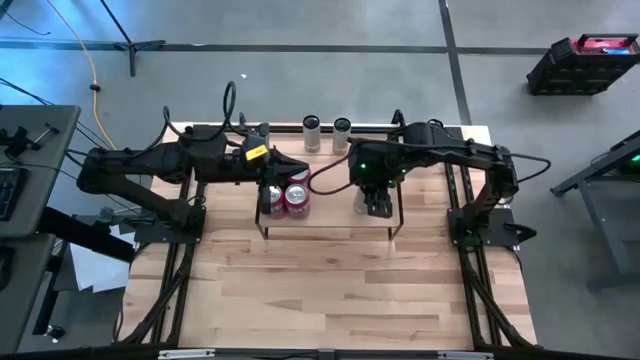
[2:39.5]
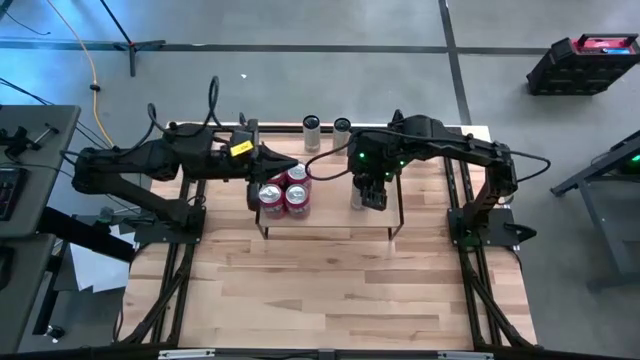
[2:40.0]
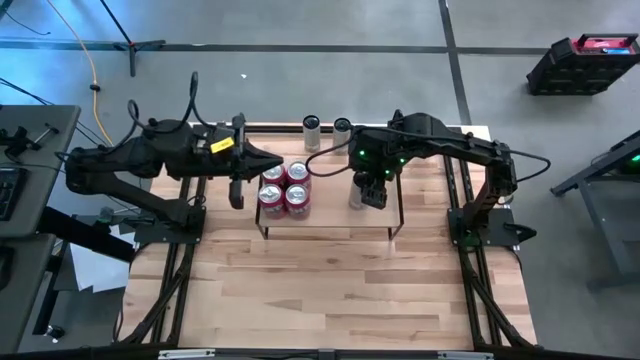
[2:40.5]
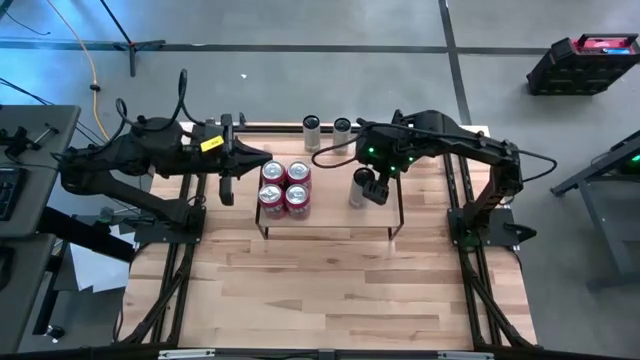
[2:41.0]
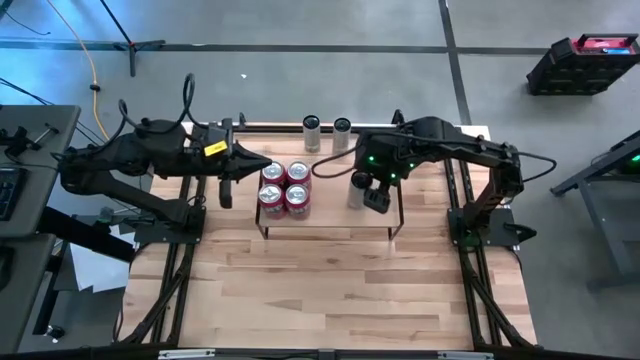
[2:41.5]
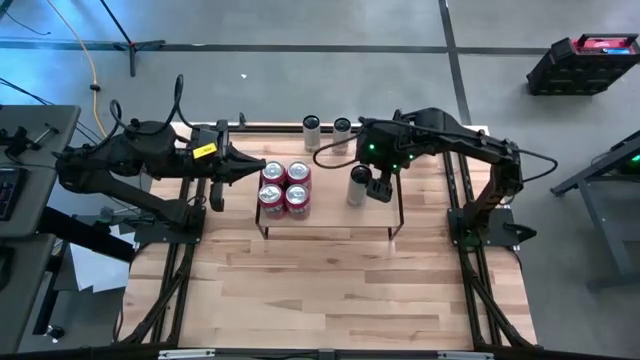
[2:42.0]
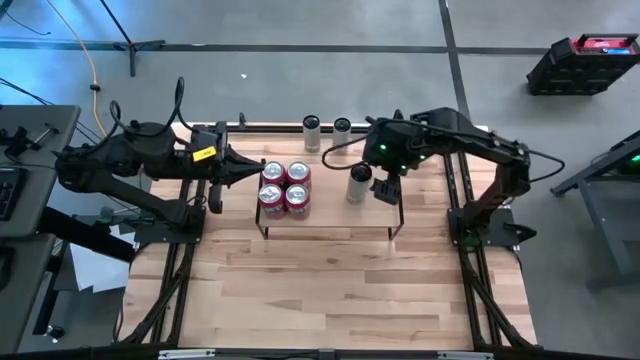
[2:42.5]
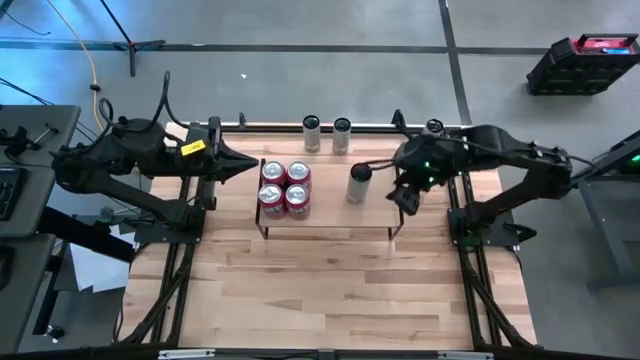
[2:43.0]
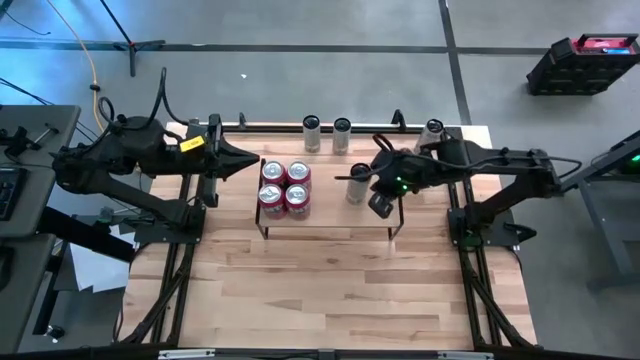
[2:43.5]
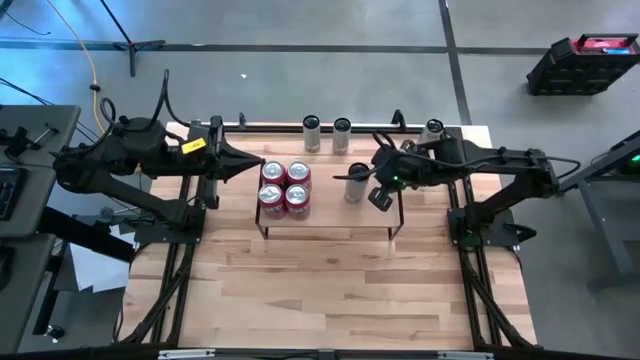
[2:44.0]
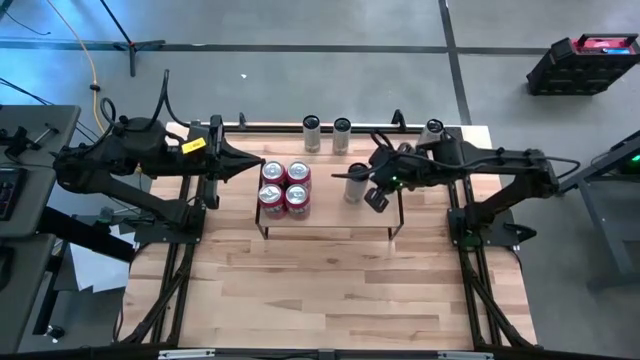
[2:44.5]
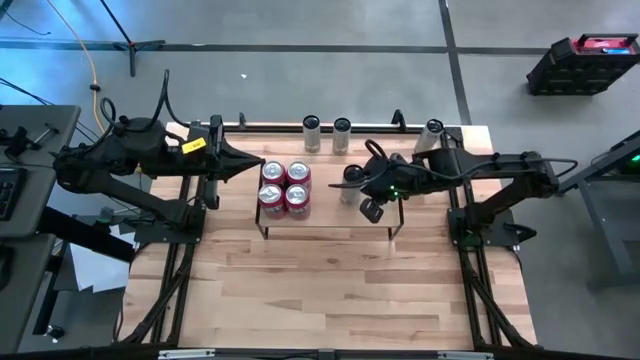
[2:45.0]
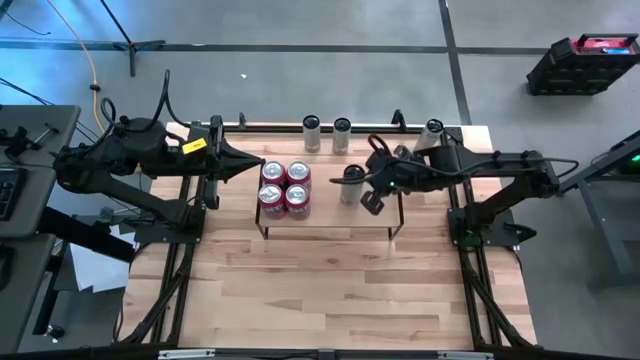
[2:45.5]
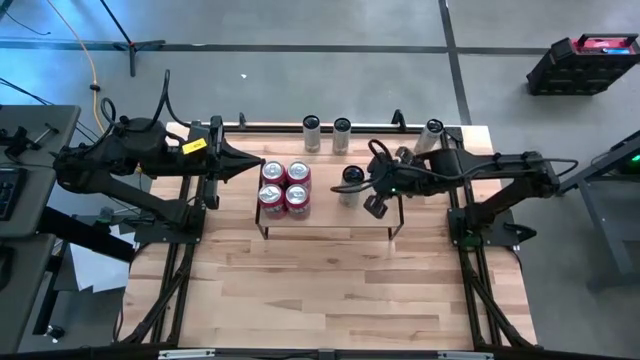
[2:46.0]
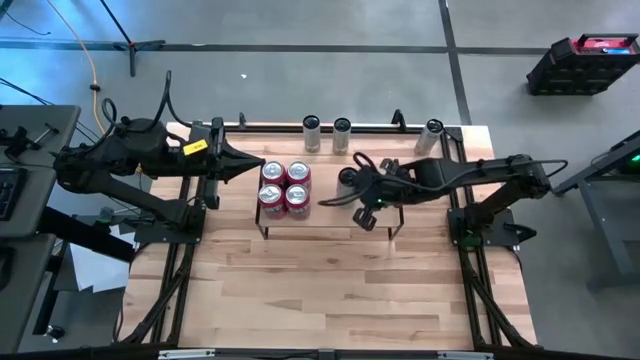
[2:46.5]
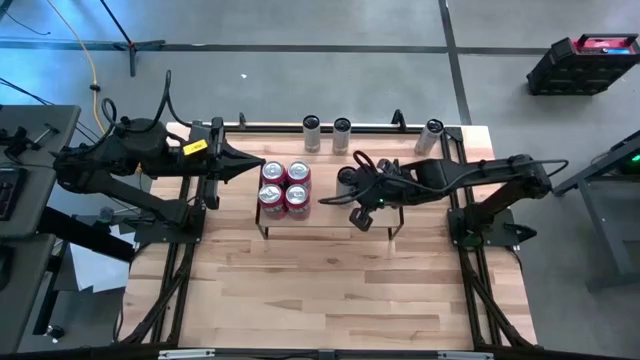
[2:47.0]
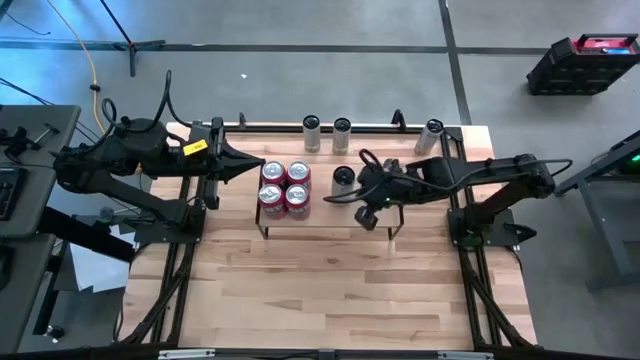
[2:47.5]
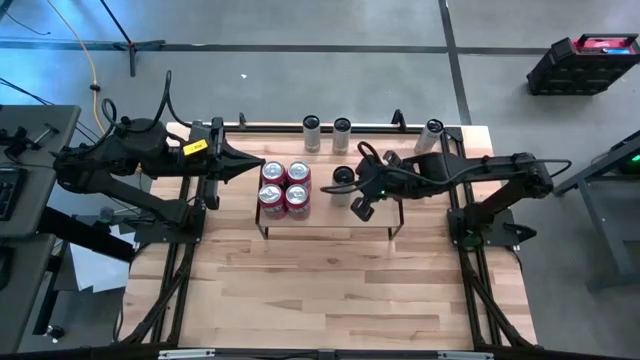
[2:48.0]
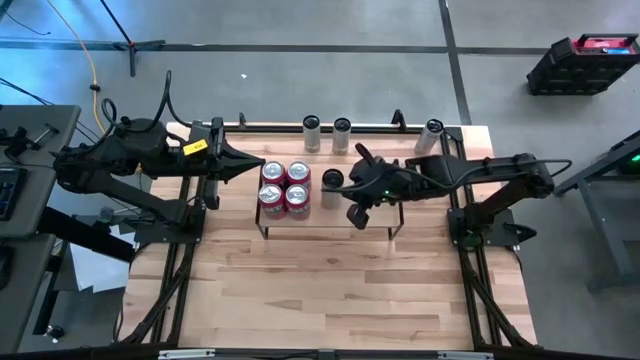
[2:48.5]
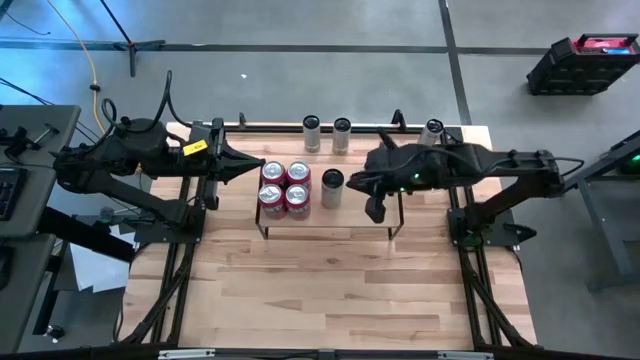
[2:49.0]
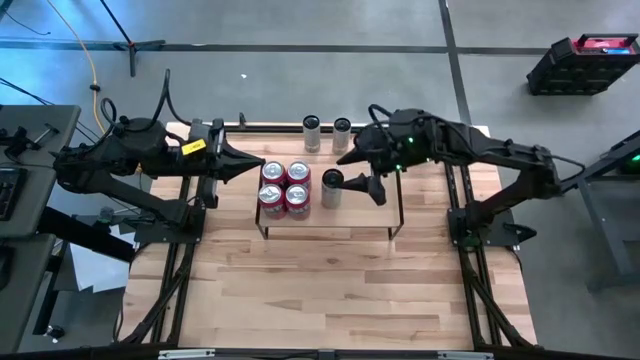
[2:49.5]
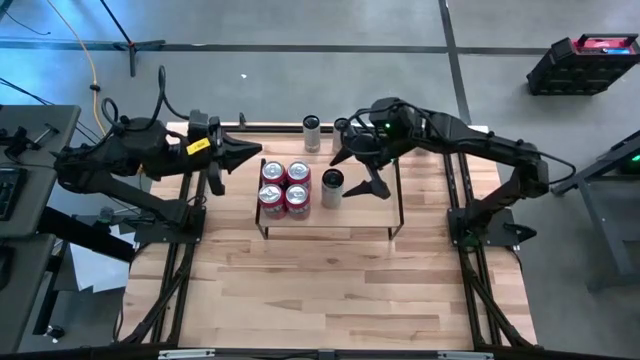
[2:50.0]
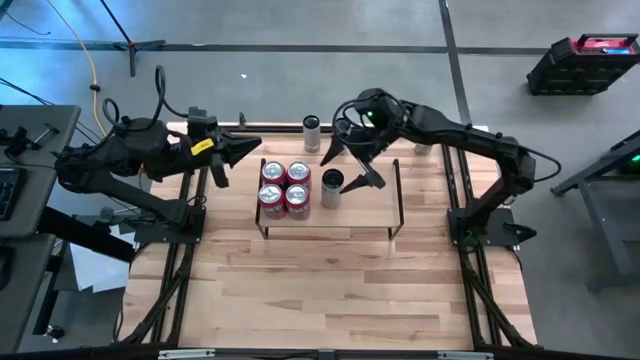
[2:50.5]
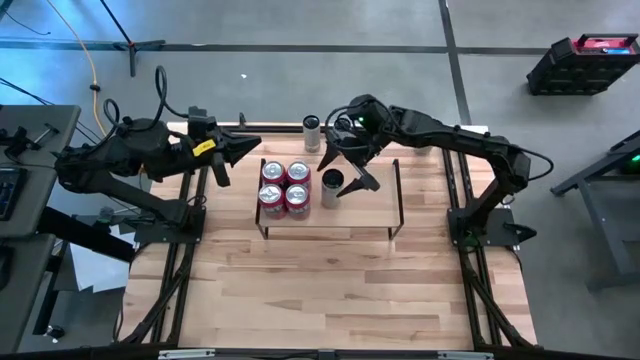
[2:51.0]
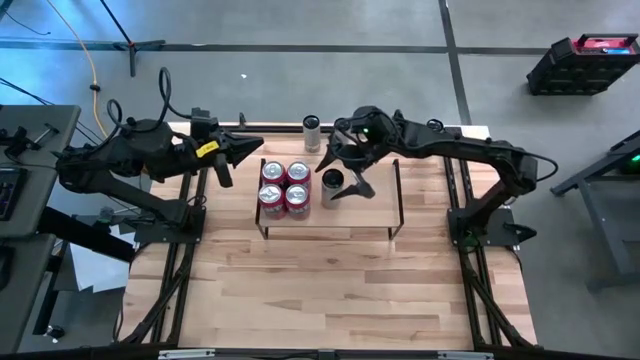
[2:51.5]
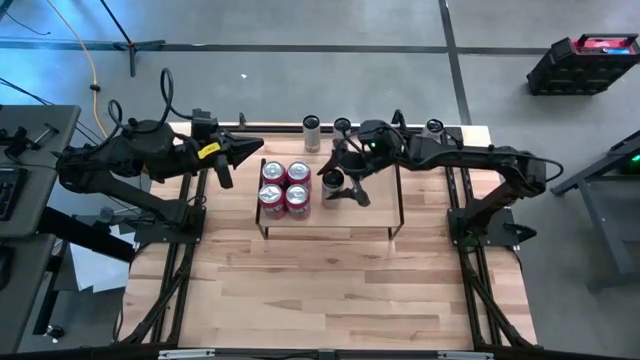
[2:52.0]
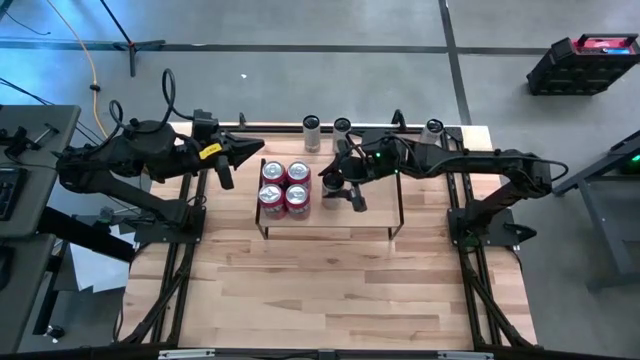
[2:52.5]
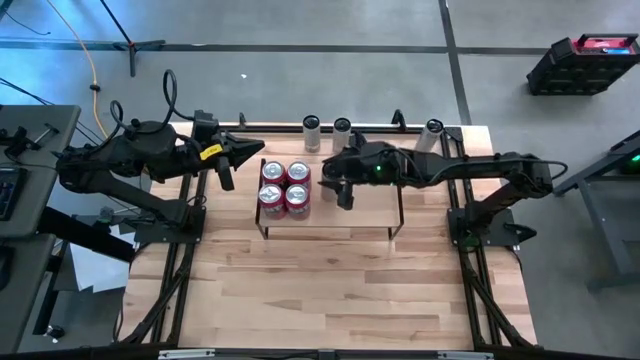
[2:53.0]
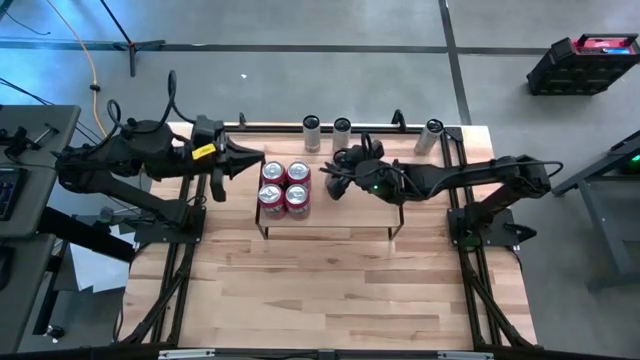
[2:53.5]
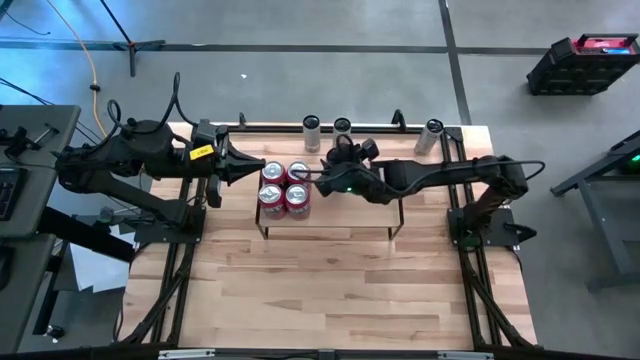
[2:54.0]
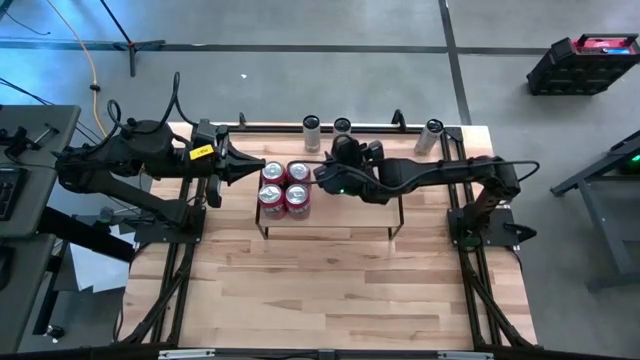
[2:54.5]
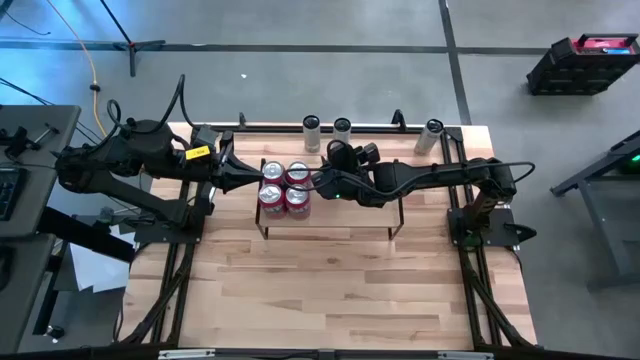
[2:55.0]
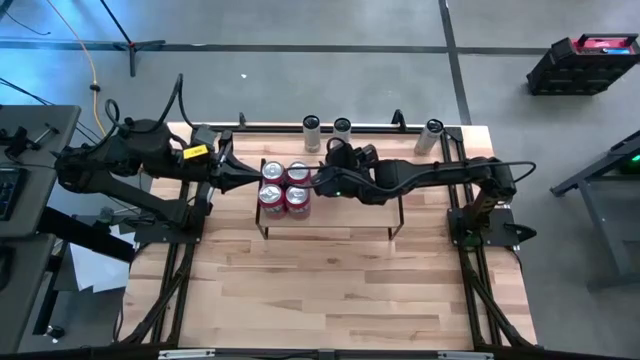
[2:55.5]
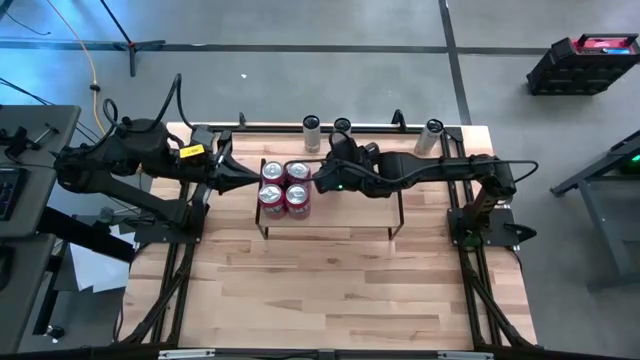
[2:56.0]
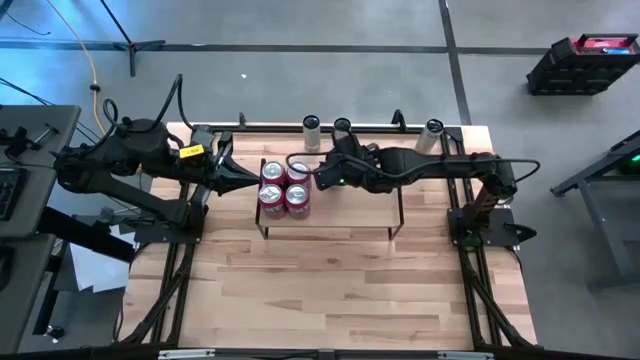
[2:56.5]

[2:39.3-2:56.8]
Task: Place canned beverage on shelf
Put the white yellow soda can on the shelf

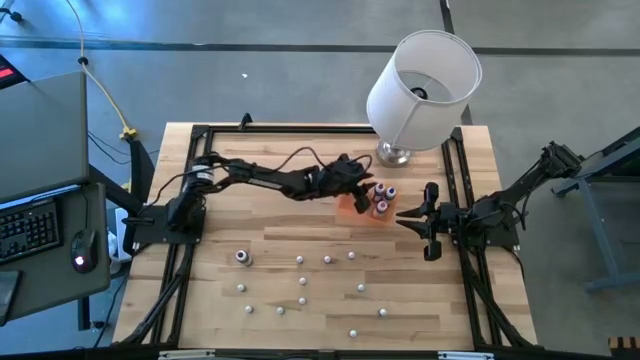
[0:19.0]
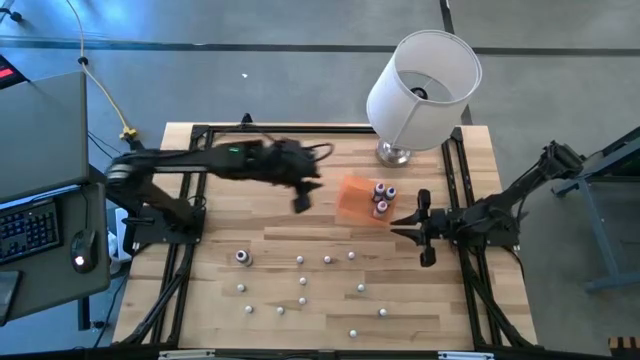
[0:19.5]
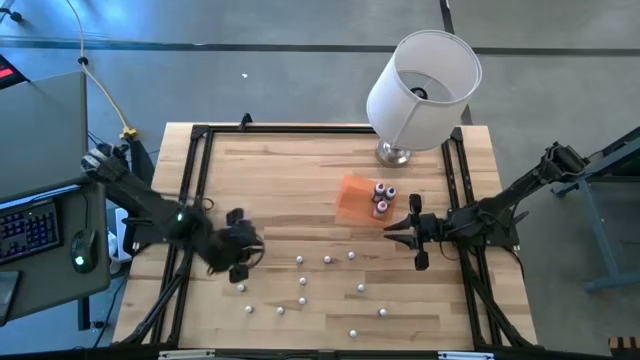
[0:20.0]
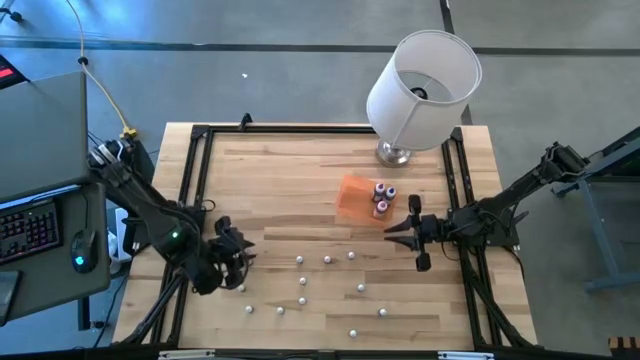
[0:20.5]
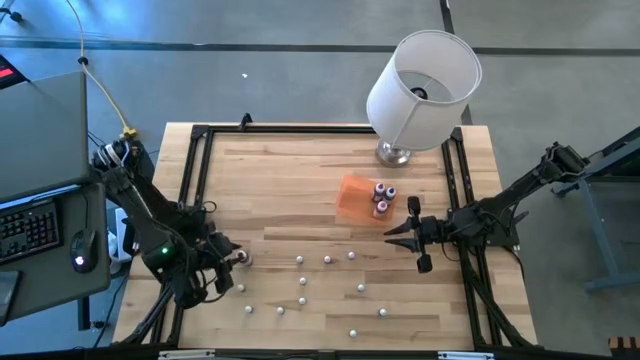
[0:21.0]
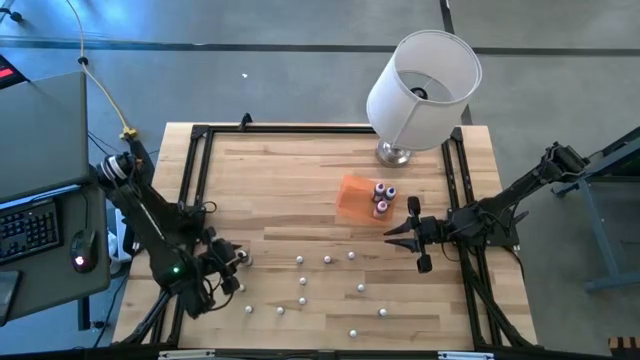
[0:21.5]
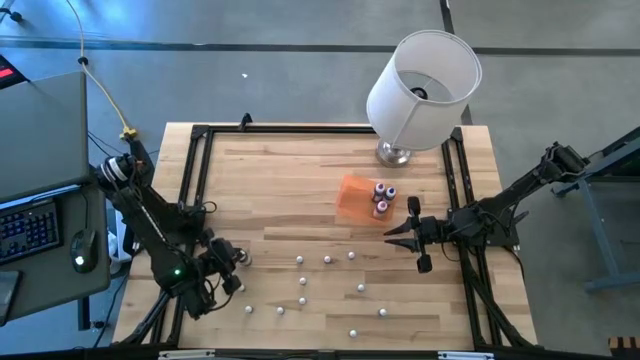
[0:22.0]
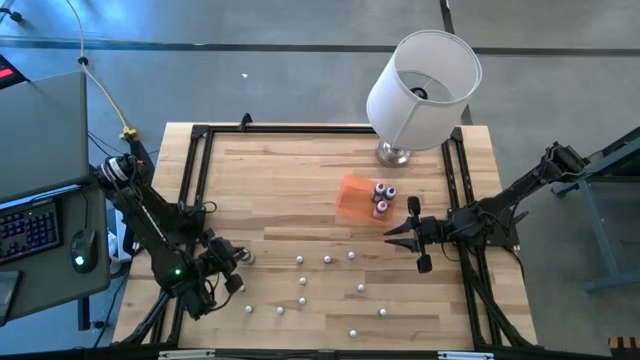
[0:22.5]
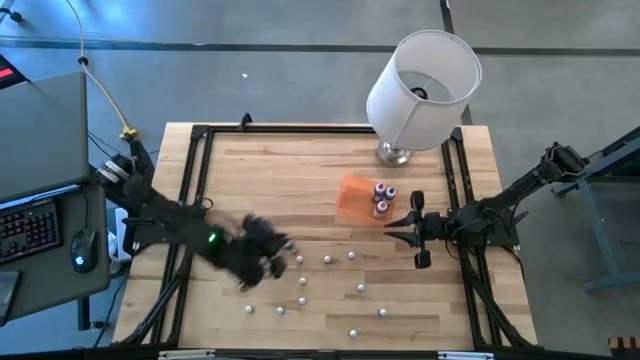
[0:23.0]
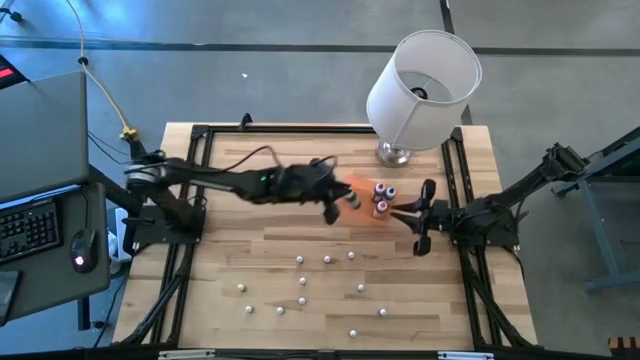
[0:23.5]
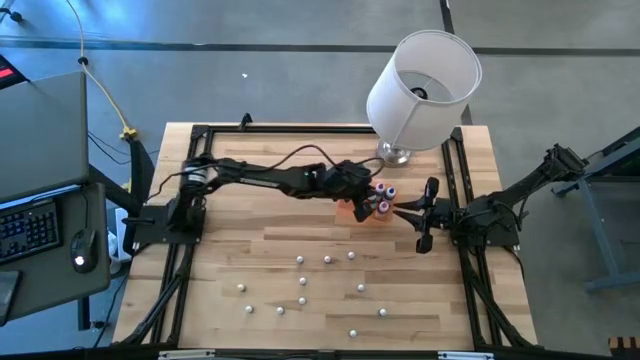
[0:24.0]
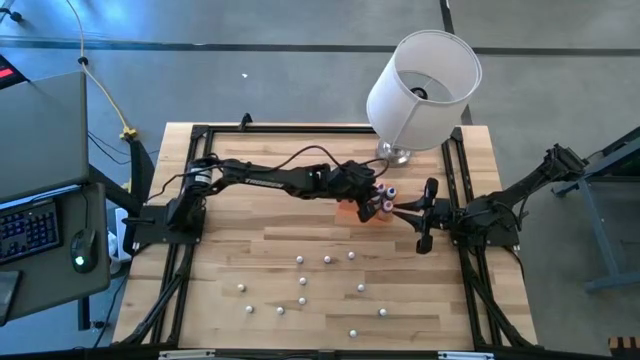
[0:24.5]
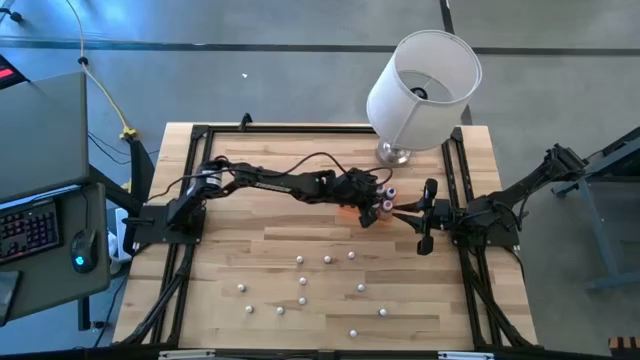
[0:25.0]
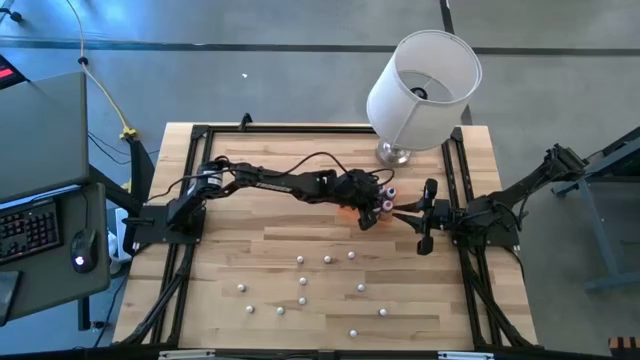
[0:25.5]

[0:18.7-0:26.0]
Task: Pick & Place food coloring
Put the large black food coloring bottle into the orange container
